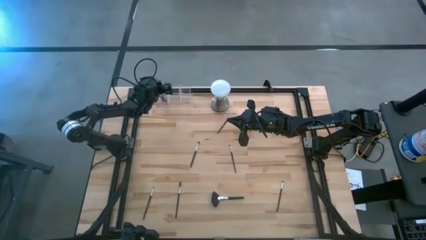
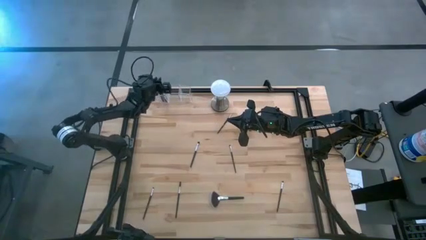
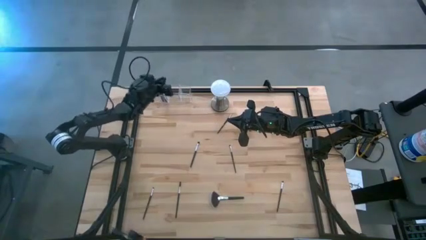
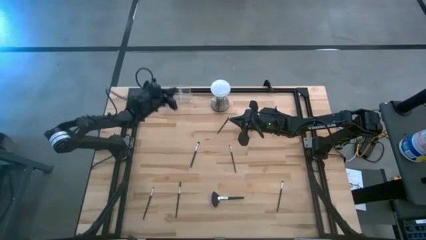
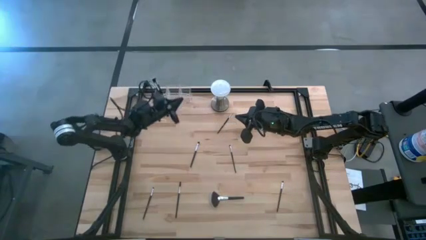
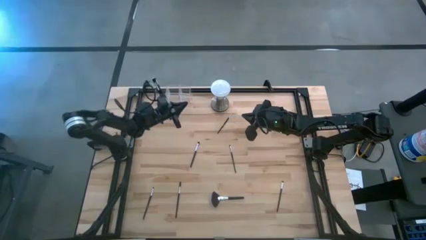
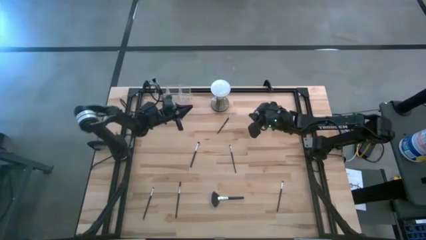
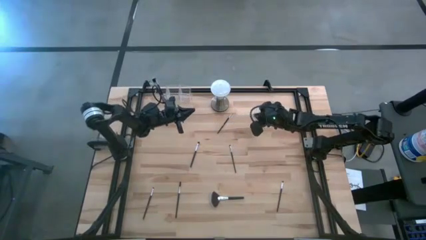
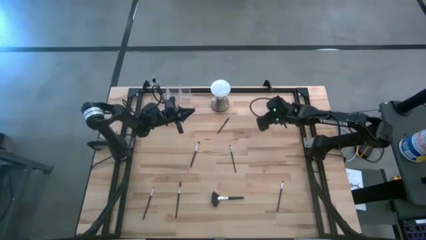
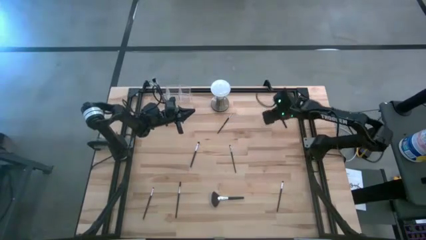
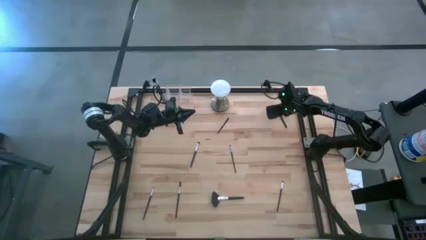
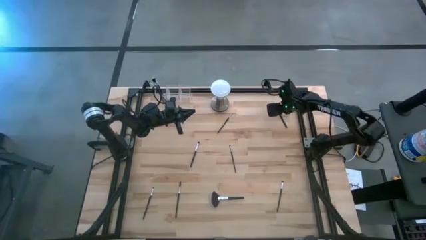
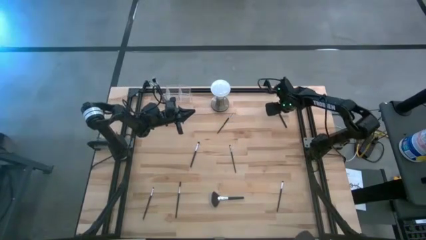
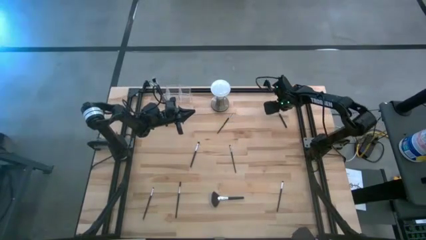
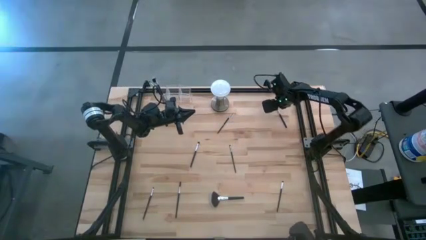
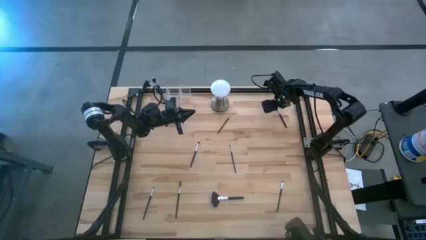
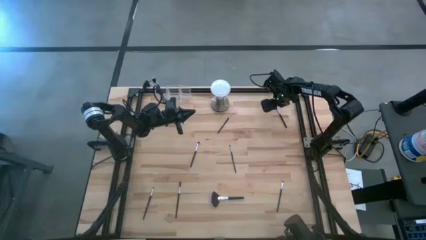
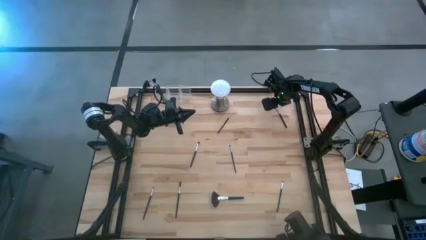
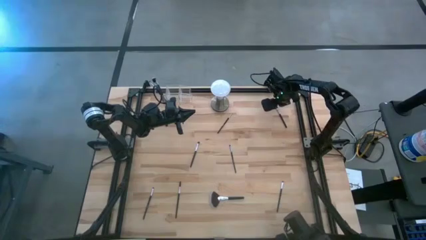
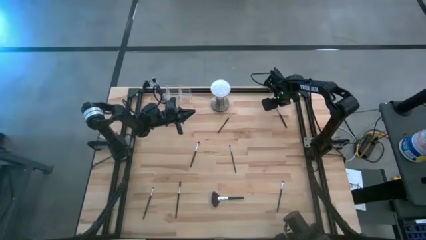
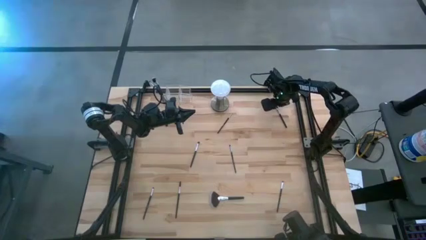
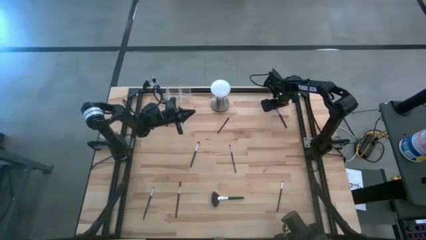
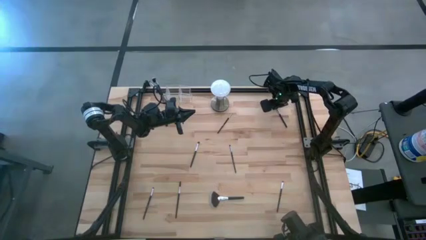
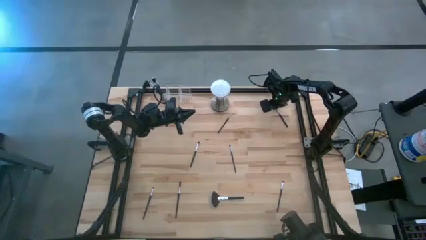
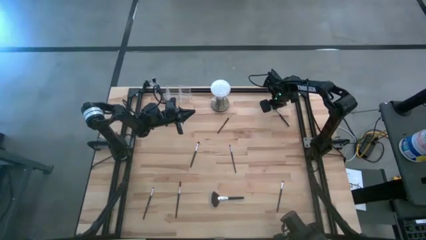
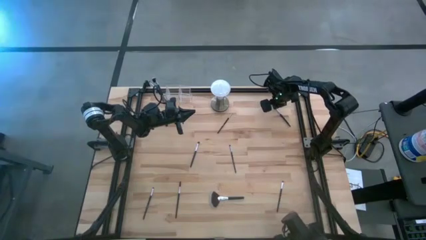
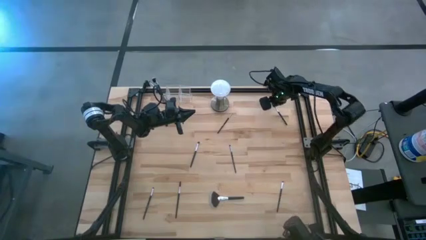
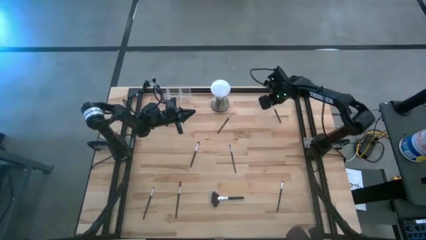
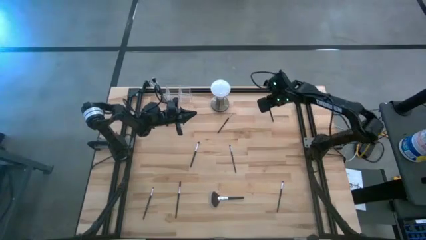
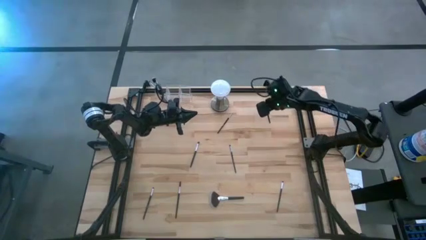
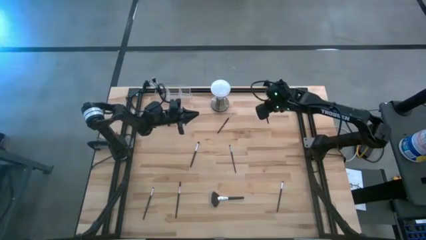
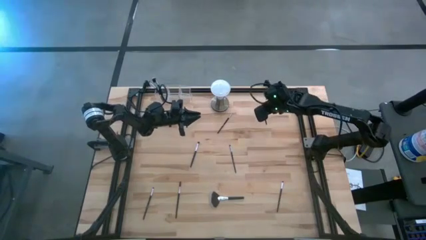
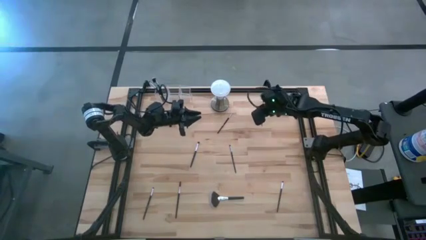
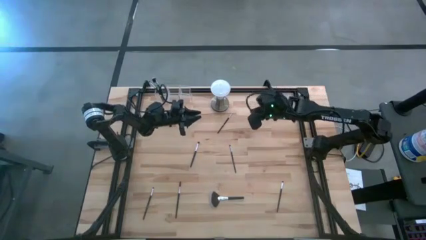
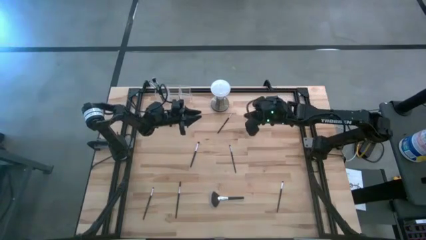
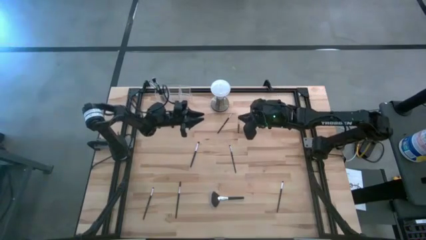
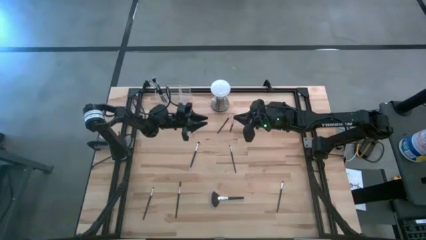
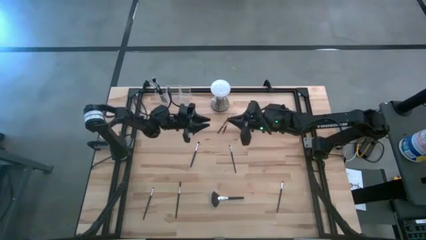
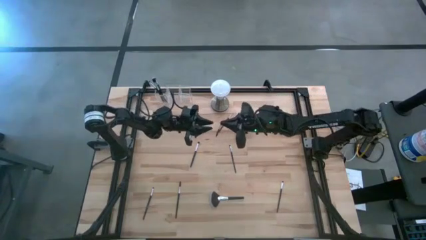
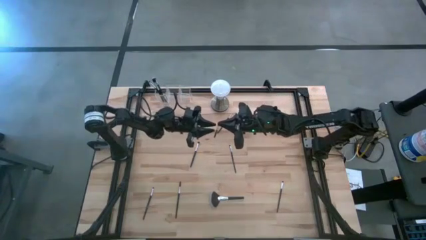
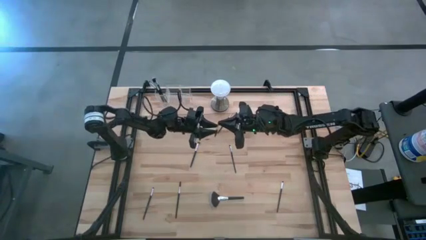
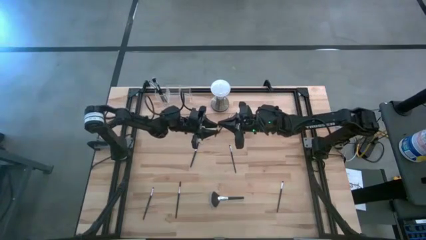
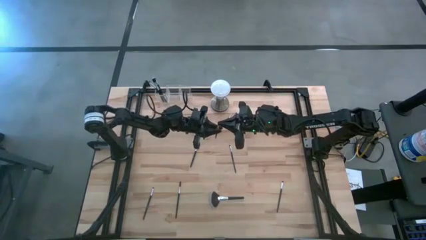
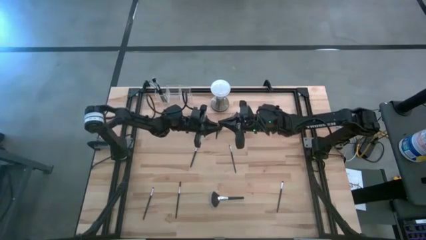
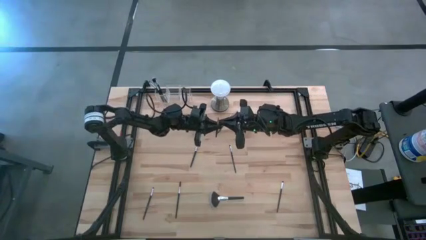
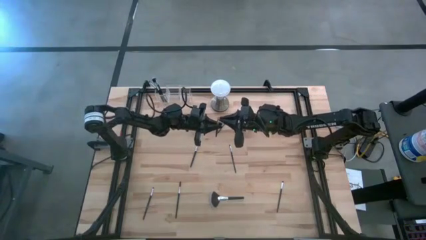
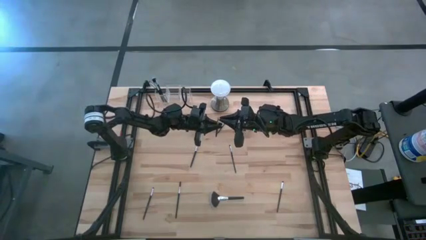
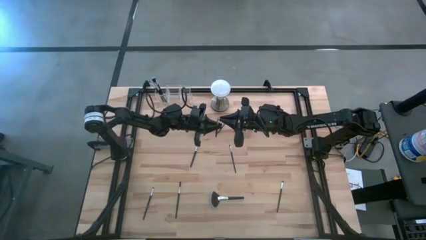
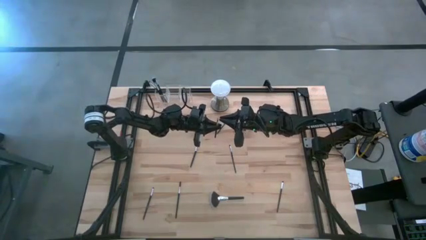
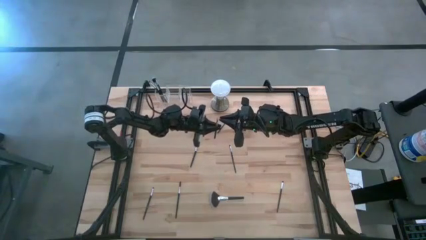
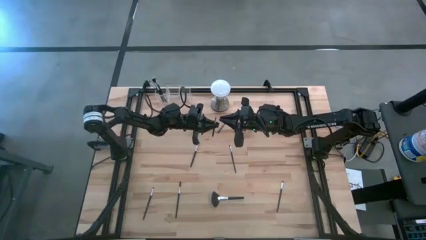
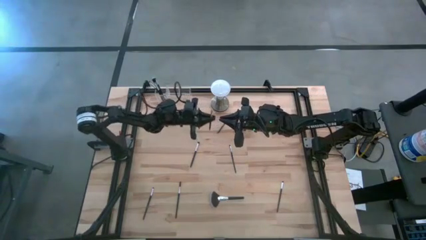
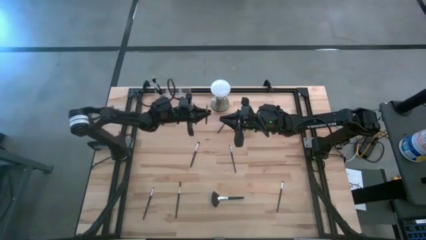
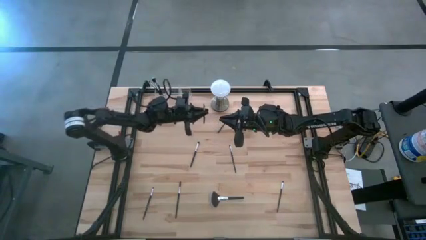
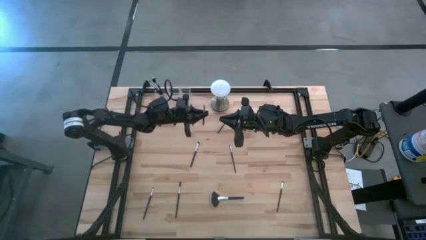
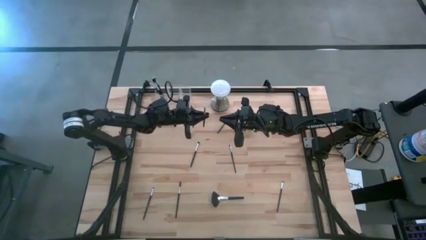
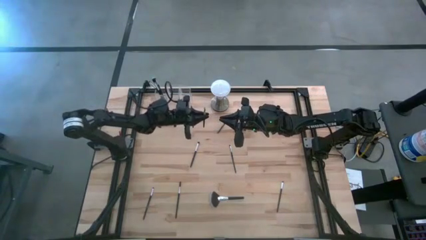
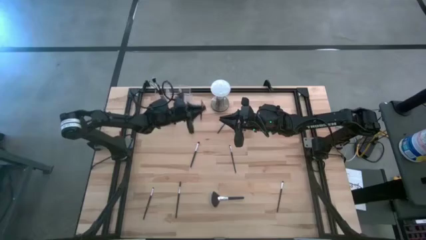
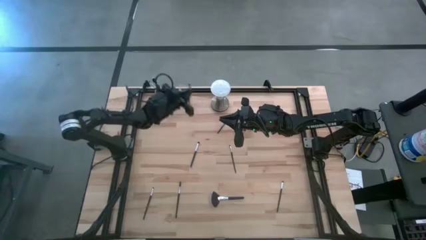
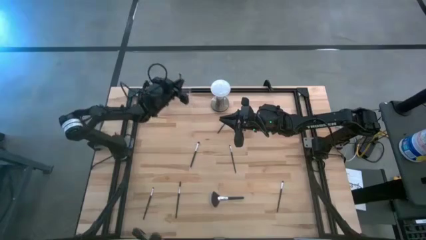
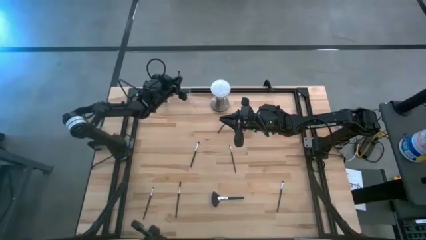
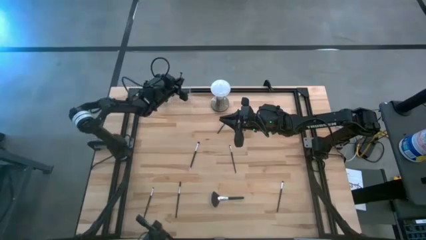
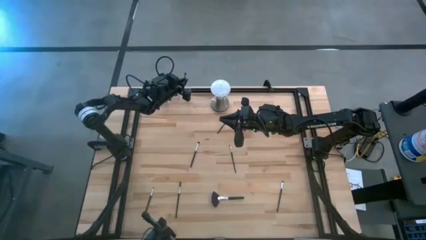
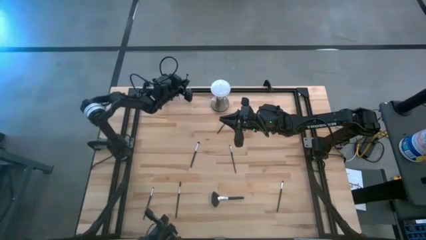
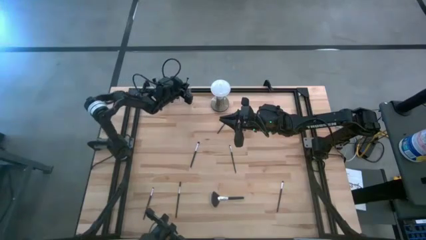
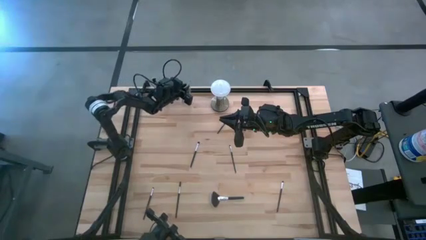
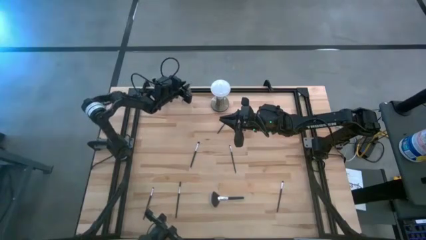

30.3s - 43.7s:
Task: Put items in baskets/containers
Put the eyeshadow brush into the right section of the transparent organizer

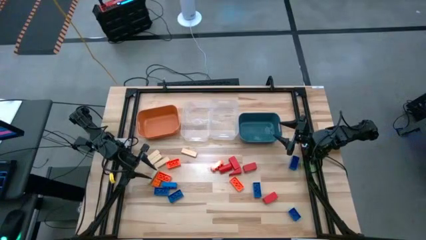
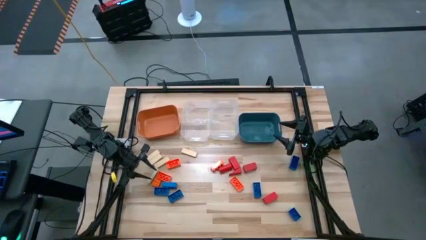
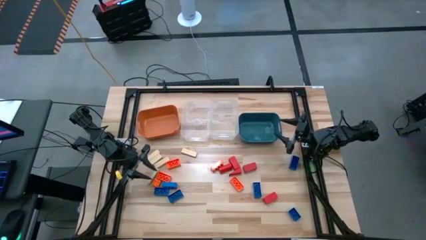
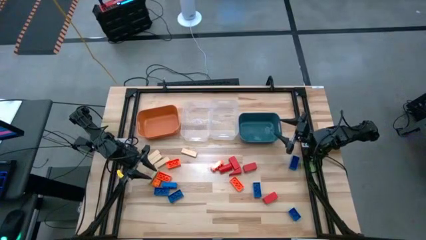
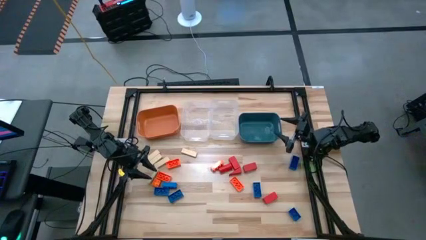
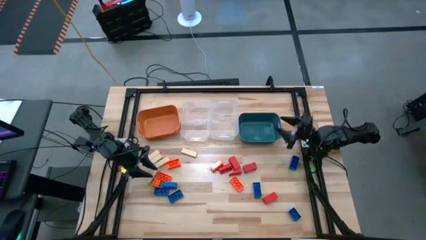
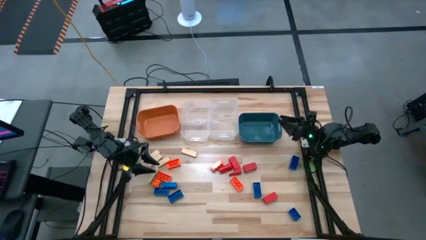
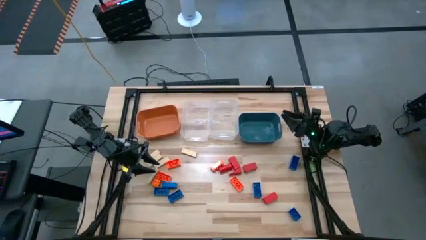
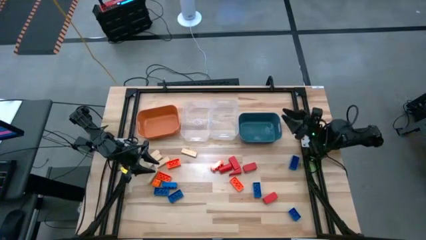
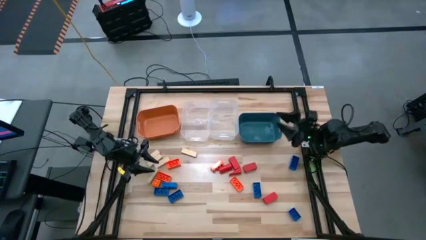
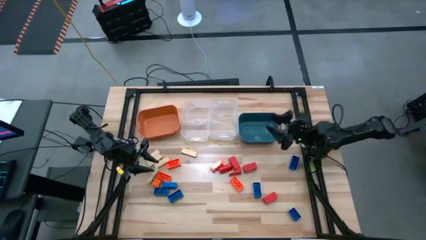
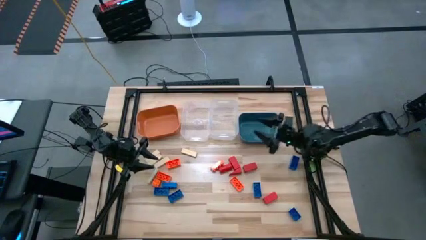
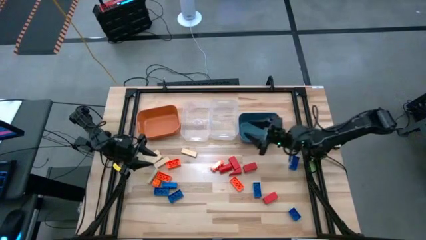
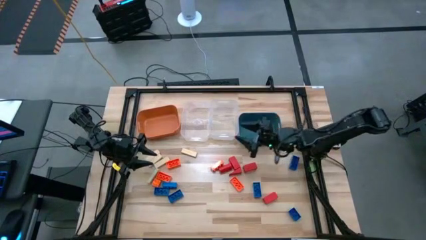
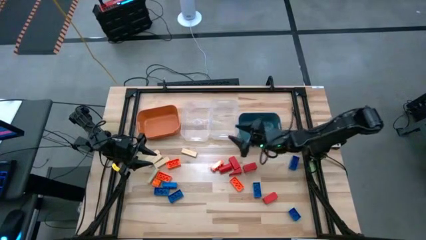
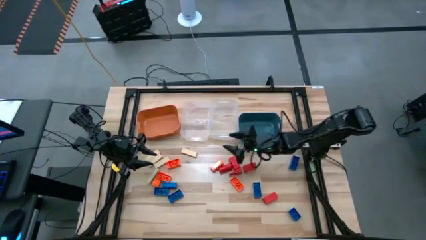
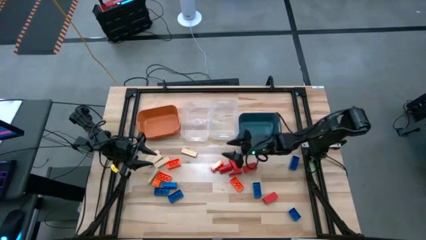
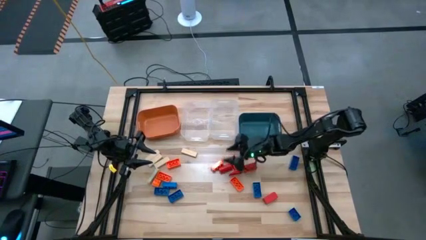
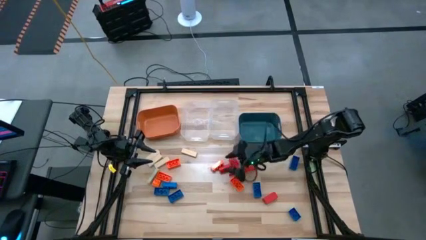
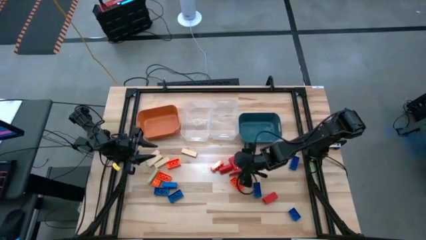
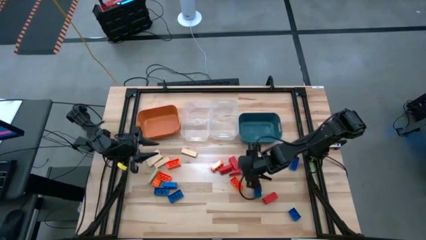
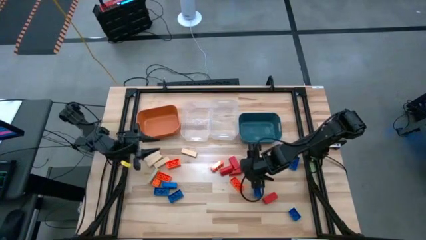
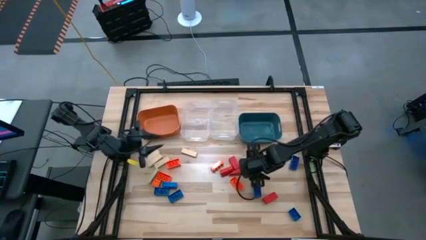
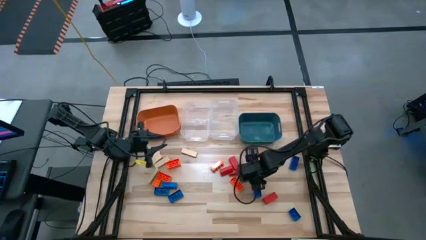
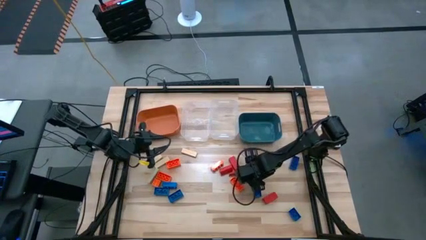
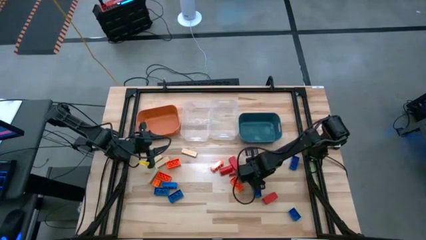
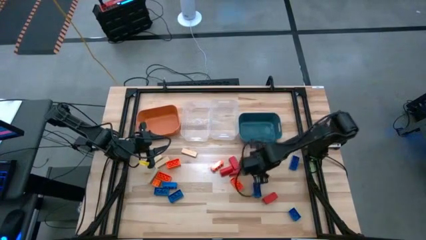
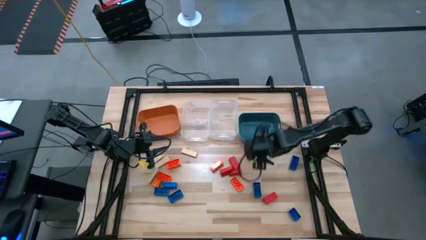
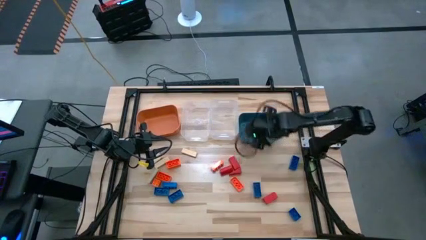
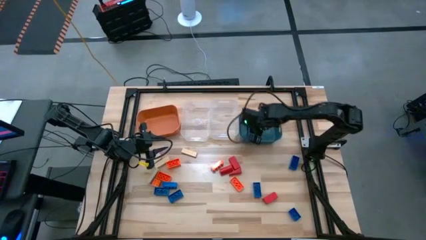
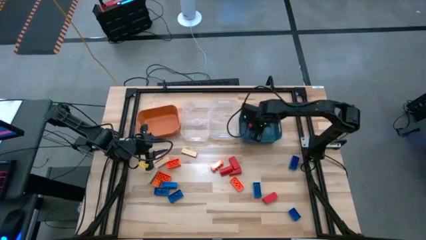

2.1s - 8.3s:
Task: Sort blocks
Put the red block into the blue bin
